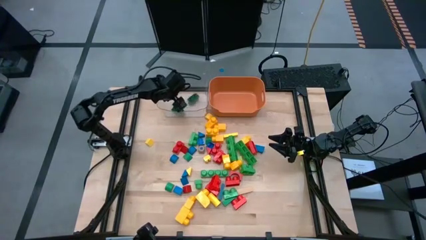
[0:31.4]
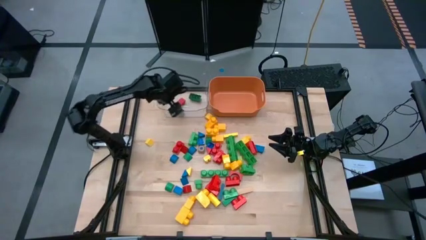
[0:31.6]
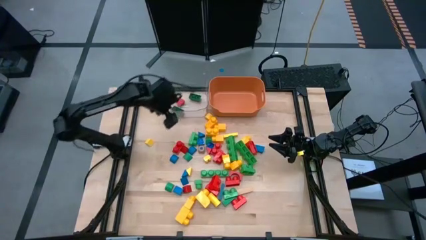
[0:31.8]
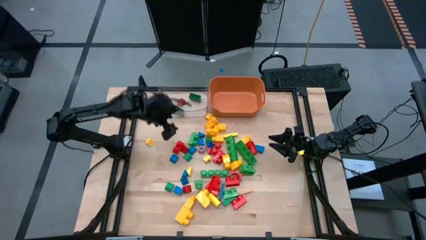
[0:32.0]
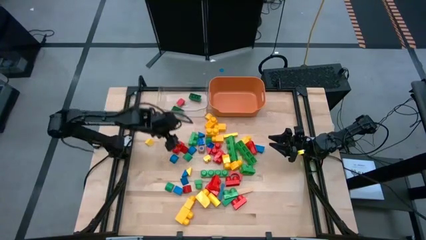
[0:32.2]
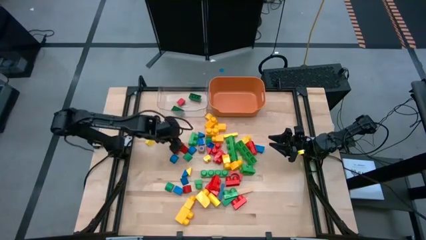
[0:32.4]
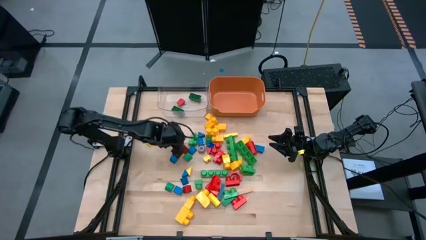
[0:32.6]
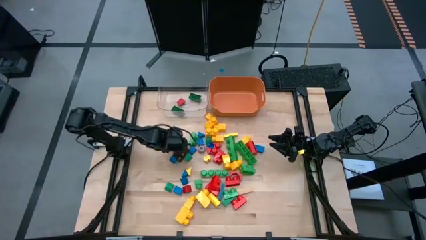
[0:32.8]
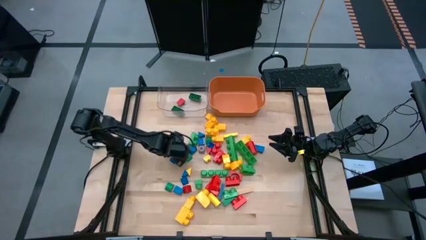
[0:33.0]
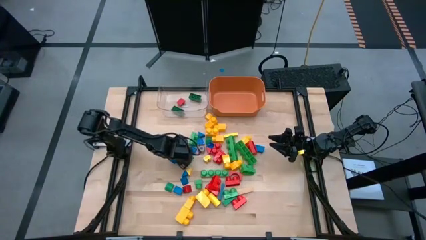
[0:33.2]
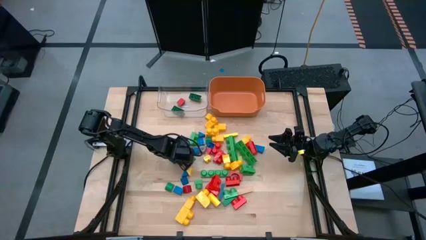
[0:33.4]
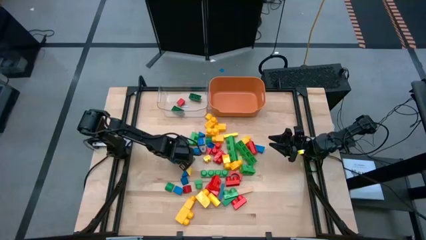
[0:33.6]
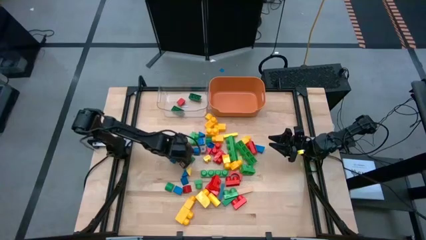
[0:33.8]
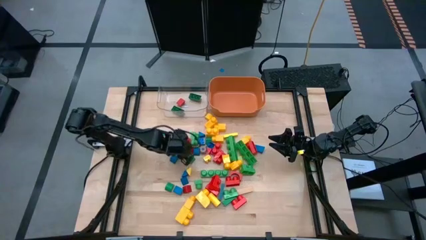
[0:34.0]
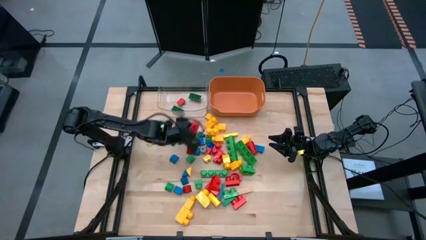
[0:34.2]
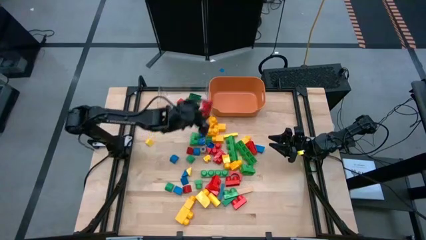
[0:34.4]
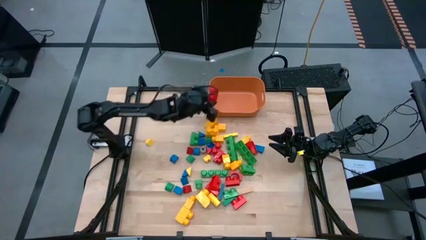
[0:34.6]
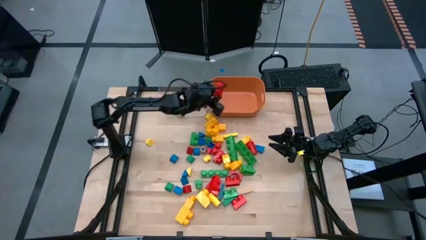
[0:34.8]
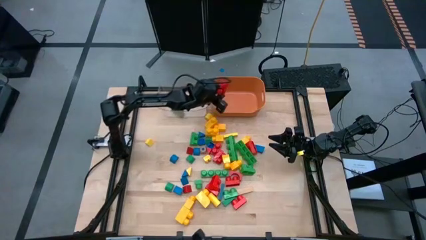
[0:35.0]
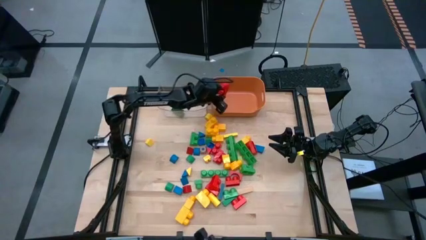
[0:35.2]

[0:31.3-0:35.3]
Task: Sort blocks by size
Put the big red game piece into the orange bin

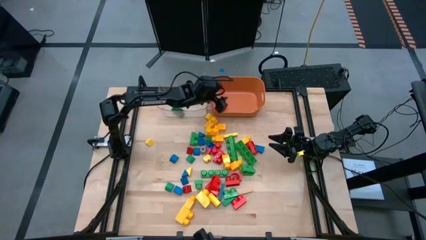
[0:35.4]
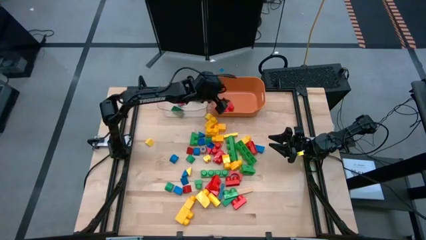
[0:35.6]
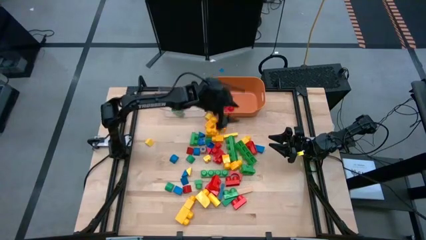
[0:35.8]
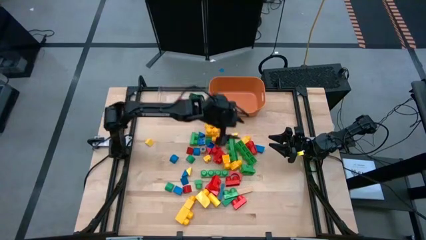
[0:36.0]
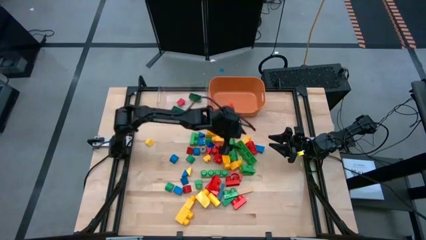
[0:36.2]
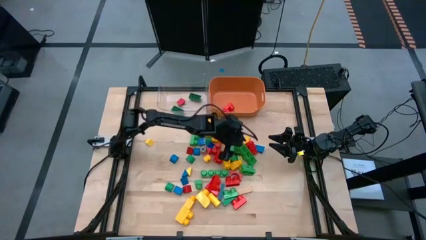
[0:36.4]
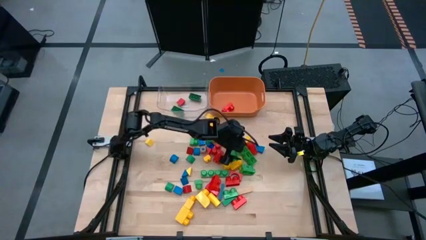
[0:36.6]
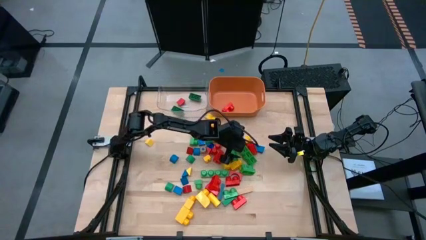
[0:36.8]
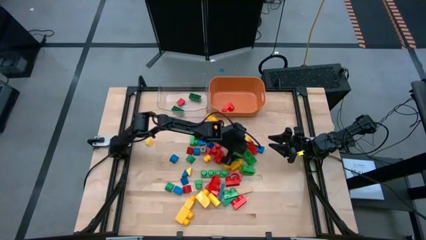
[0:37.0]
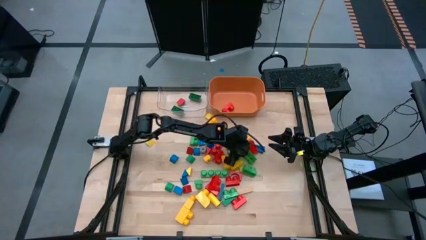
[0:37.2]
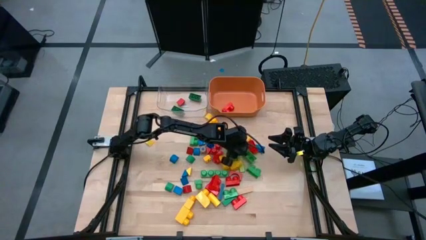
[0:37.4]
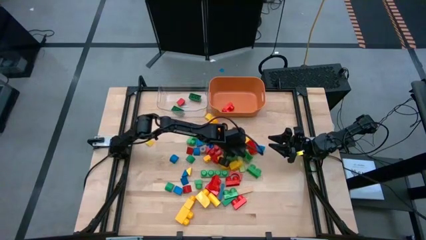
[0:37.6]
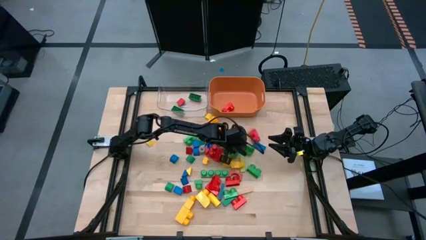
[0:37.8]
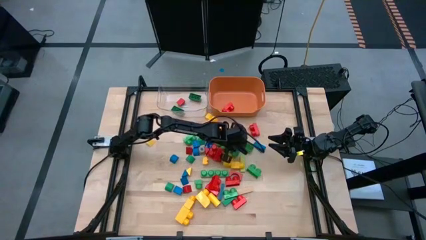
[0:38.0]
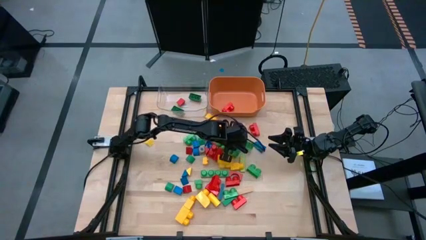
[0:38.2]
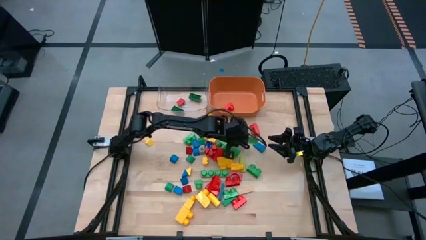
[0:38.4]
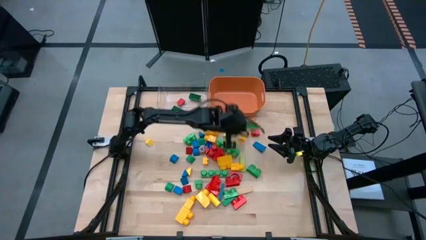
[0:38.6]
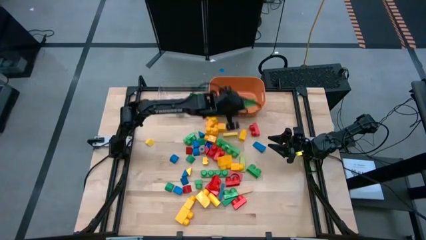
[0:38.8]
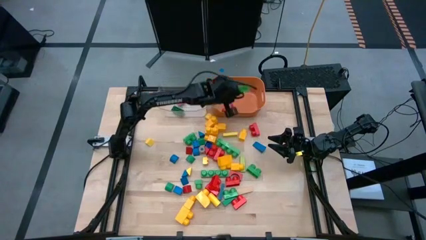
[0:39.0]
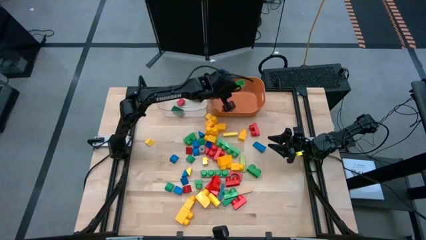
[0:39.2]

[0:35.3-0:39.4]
Put the big green game piece into the orange bin

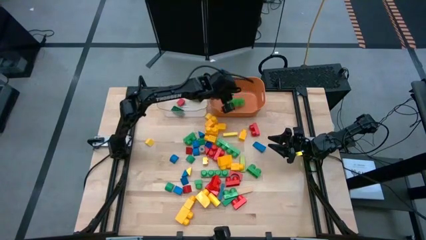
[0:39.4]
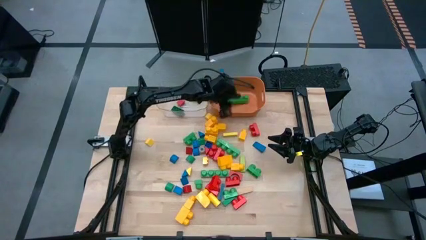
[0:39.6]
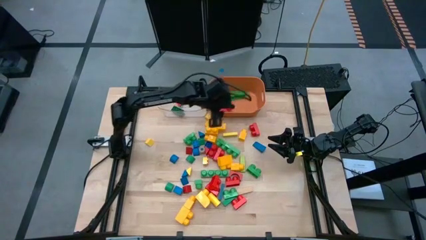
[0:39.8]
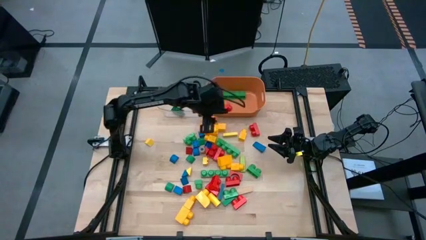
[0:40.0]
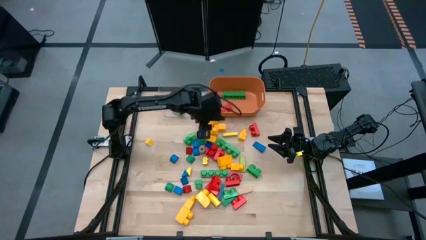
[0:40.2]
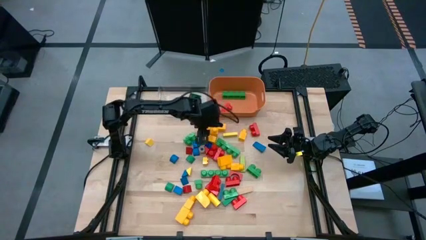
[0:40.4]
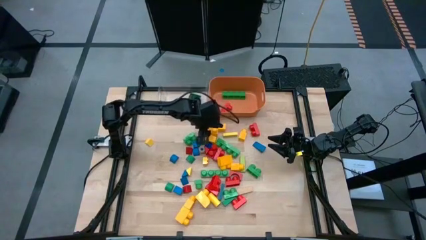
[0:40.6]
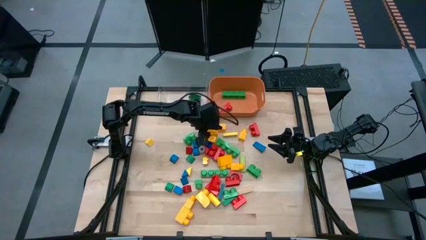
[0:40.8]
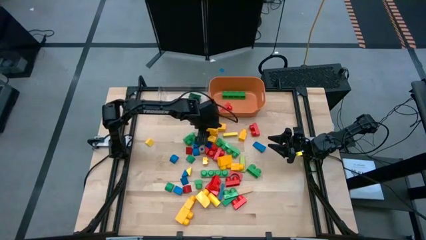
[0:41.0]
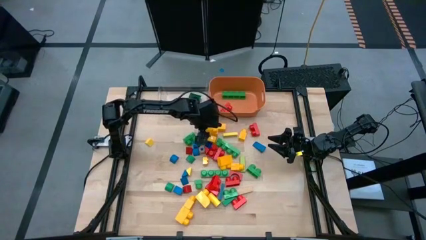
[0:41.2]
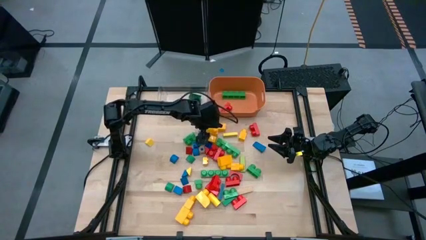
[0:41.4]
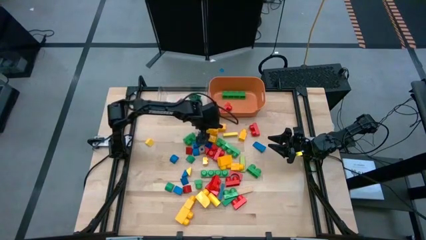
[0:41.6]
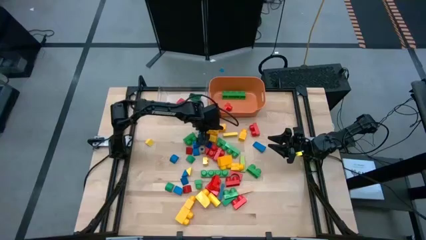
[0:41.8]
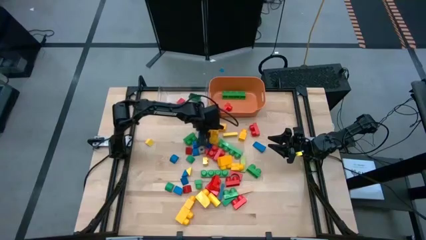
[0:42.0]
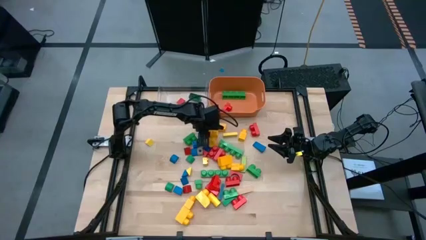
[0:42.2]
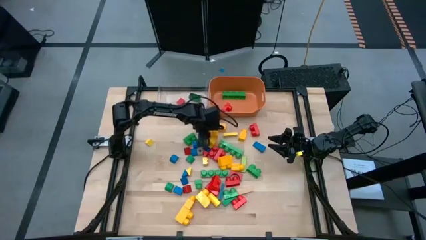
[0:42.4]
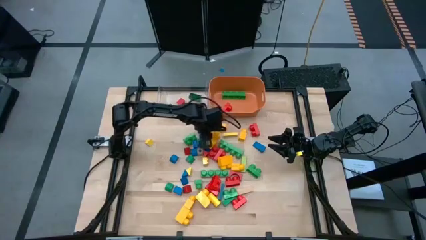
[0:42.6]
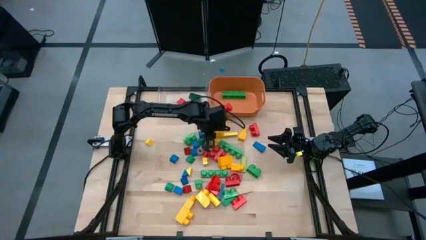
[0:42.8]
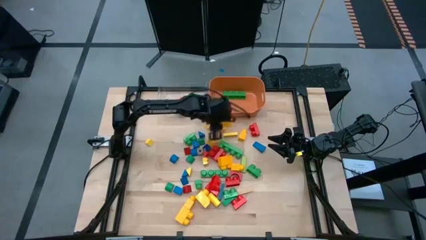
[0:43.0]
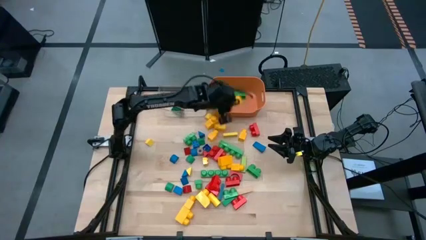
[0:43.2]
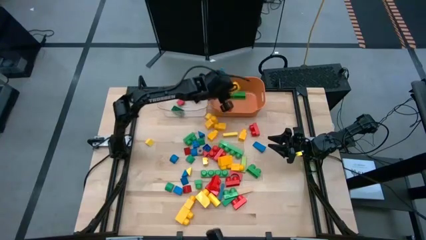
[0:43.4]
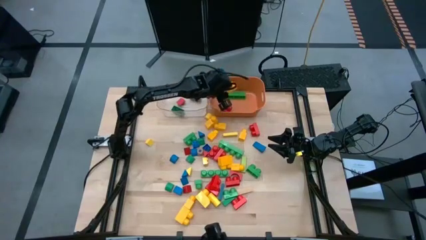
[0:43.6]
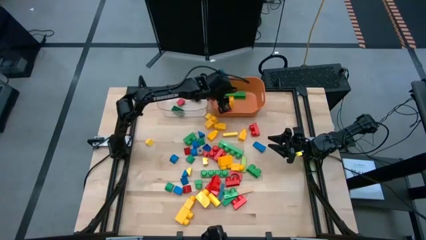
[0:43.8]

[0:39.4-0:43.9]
Put the big yellow game piece into the orange bin

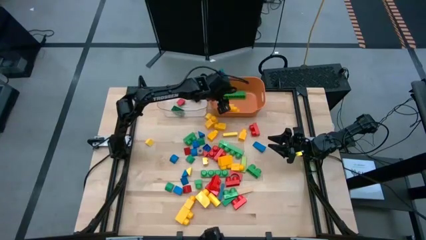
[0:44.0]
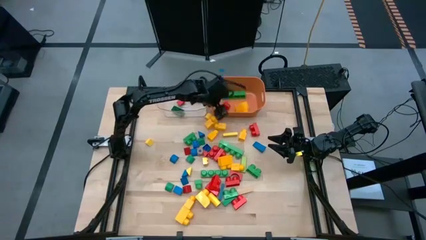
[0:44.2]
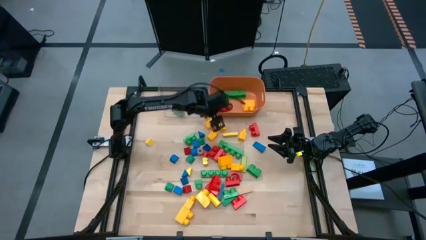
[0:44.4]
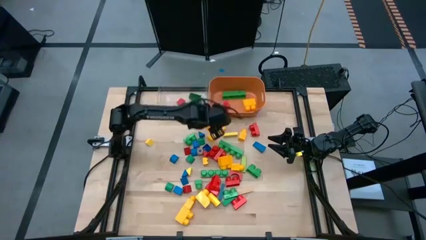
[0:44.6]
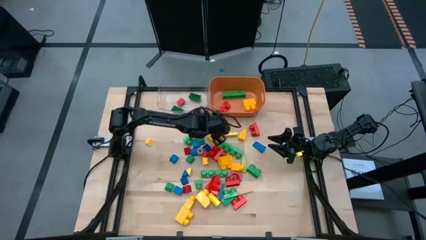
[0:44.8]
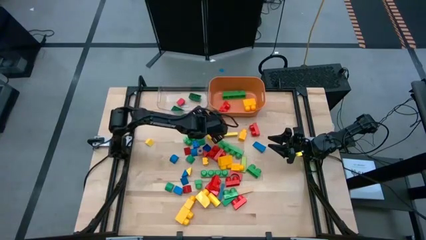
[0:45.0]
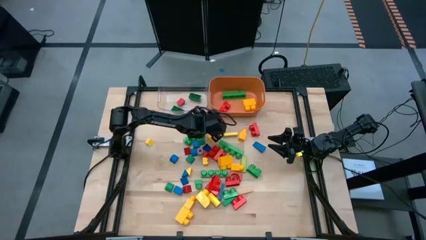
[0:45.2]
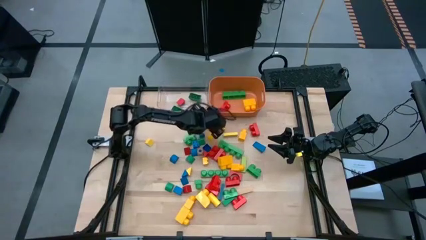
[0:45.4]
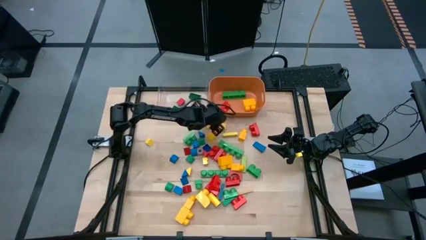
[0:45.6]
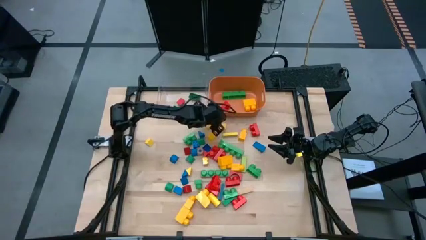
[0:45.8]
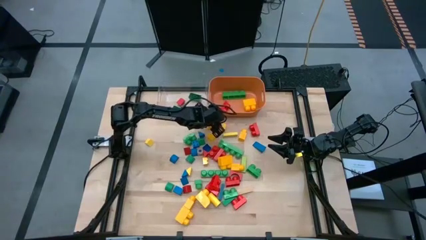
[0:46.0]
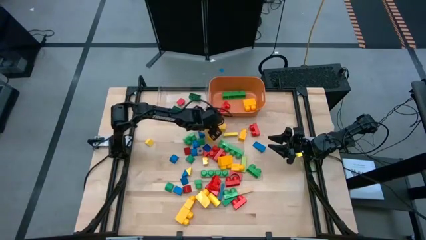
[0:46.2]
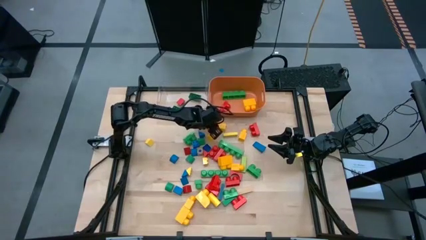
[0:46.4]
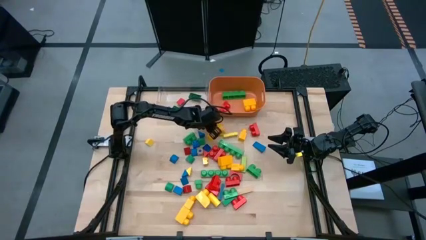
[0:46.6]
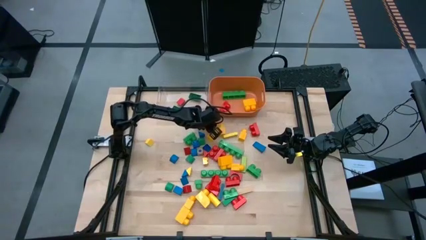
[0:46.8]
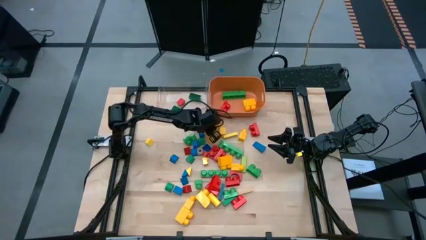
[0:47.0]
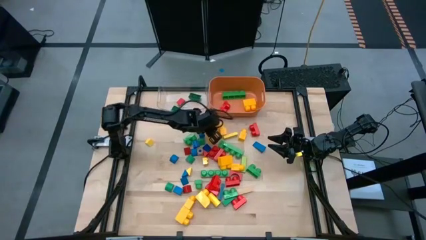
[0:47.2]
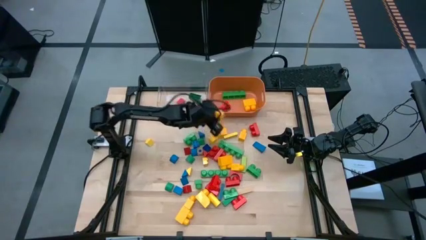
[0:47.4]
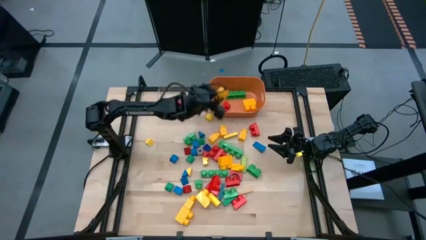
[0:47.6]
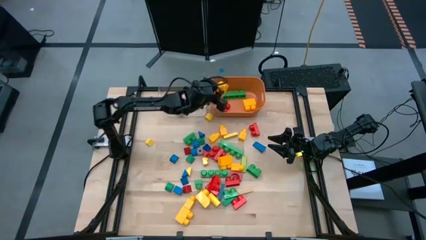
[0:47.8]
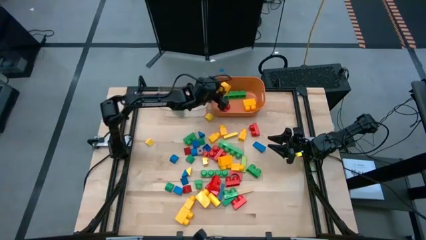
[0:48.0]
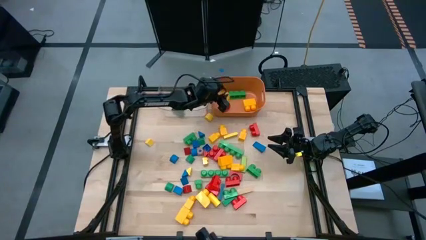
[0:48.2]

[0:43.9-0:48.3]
Put the big yellow game piece into the orange bin
